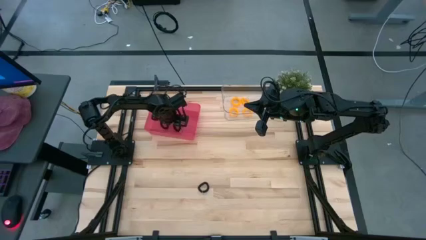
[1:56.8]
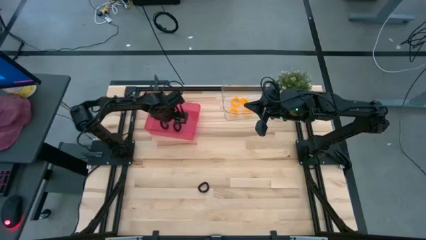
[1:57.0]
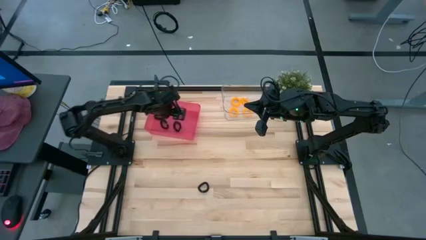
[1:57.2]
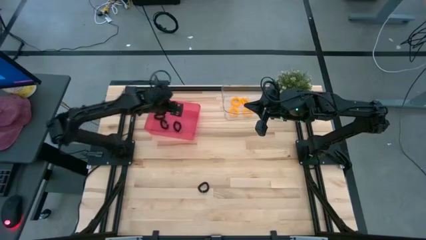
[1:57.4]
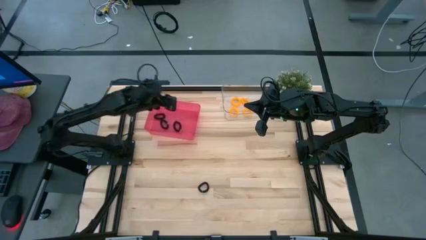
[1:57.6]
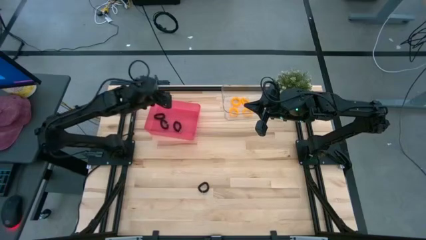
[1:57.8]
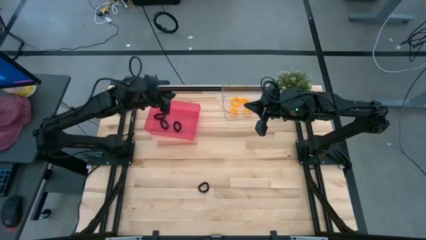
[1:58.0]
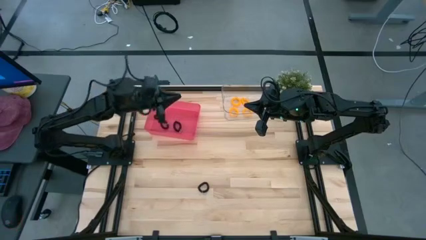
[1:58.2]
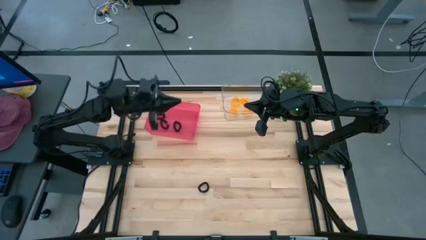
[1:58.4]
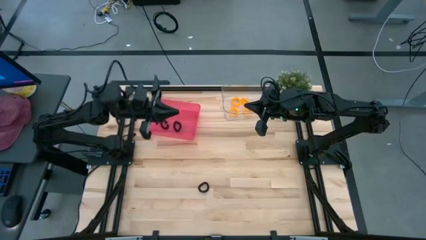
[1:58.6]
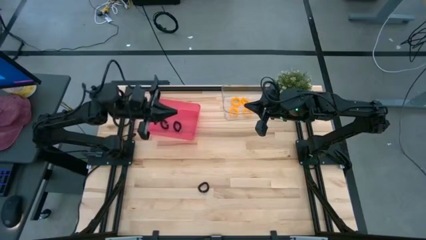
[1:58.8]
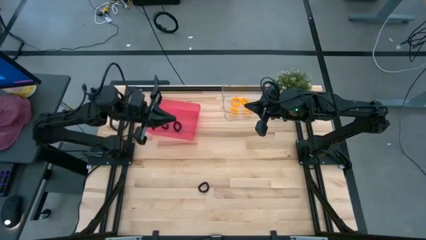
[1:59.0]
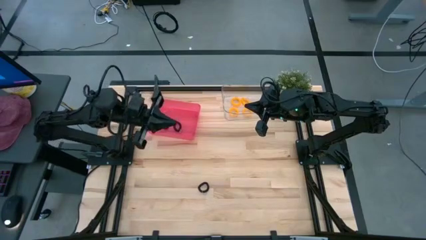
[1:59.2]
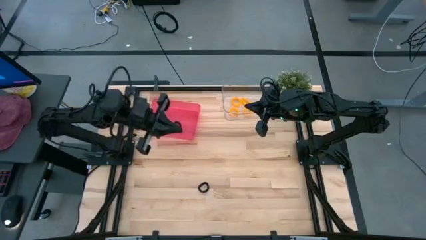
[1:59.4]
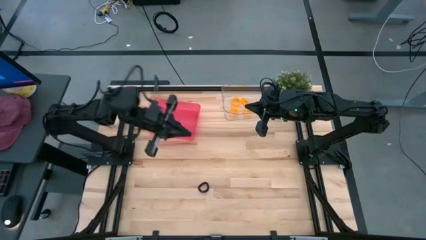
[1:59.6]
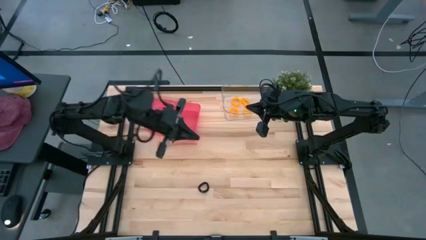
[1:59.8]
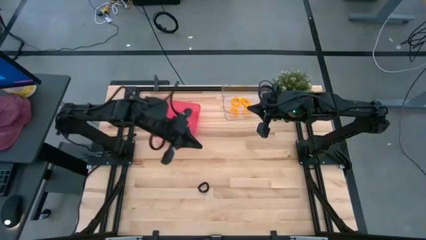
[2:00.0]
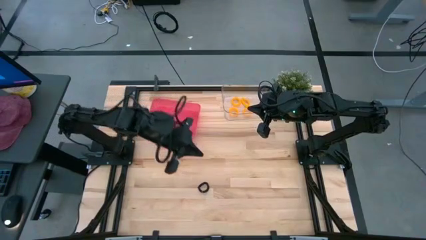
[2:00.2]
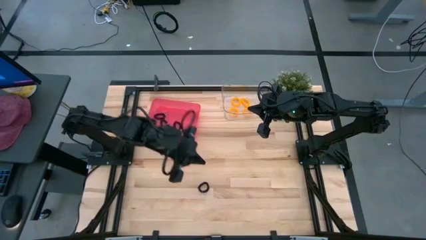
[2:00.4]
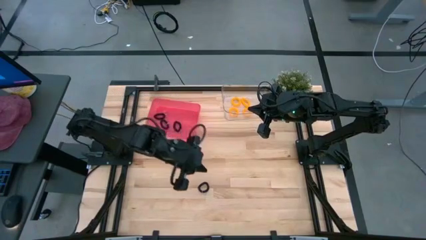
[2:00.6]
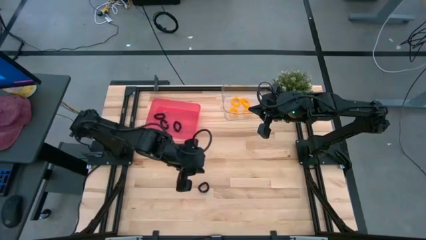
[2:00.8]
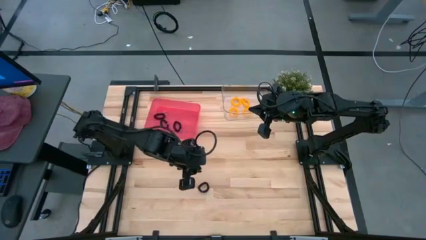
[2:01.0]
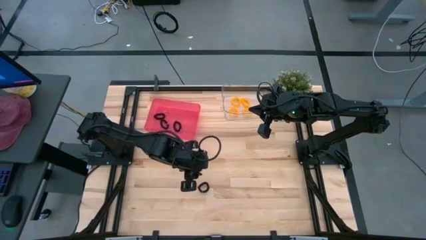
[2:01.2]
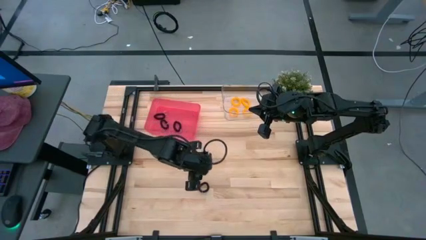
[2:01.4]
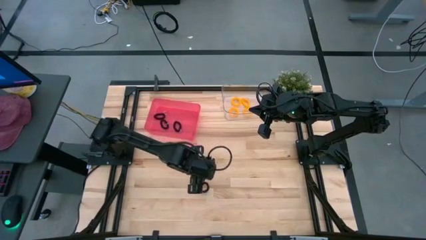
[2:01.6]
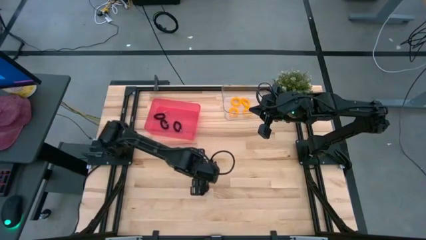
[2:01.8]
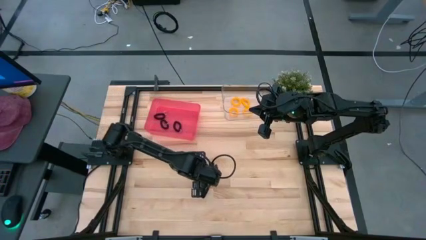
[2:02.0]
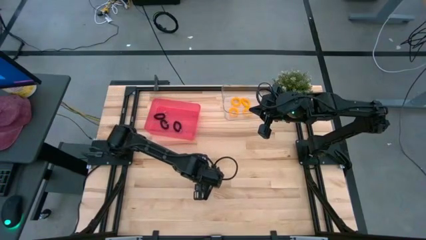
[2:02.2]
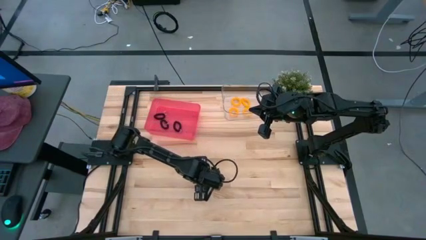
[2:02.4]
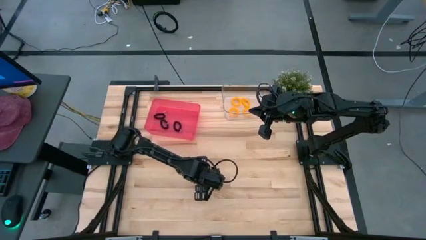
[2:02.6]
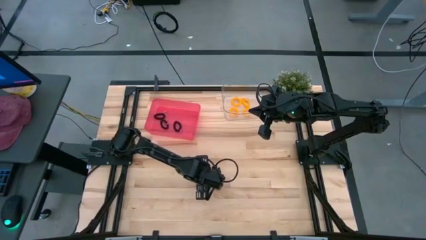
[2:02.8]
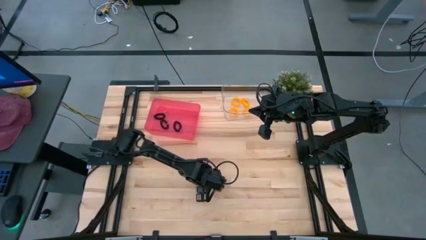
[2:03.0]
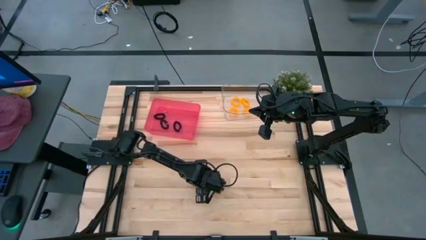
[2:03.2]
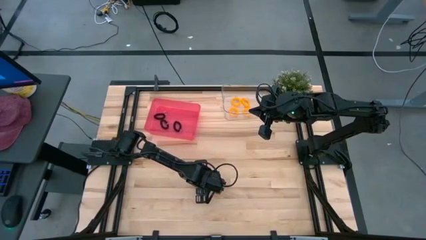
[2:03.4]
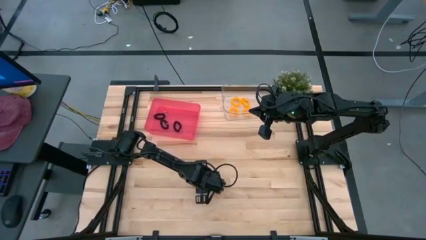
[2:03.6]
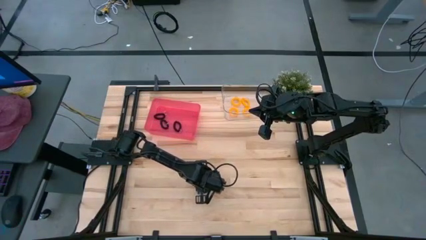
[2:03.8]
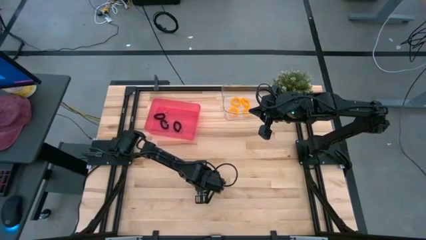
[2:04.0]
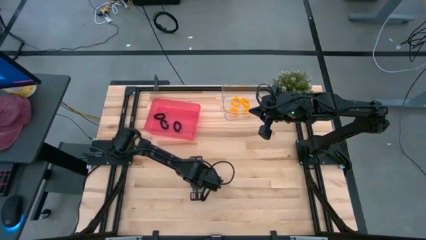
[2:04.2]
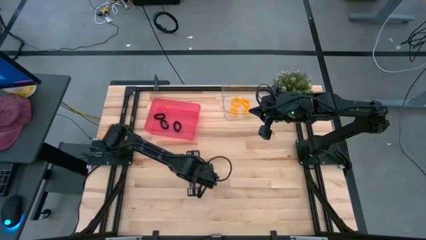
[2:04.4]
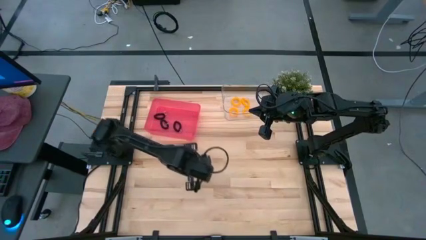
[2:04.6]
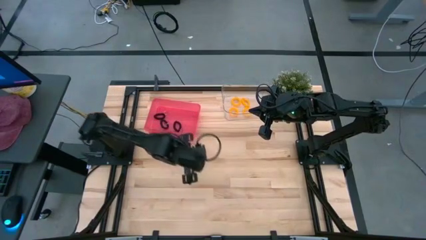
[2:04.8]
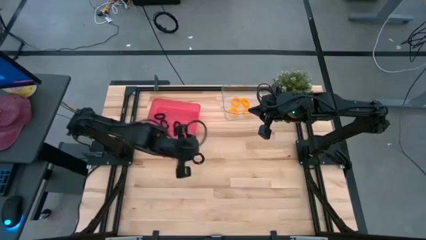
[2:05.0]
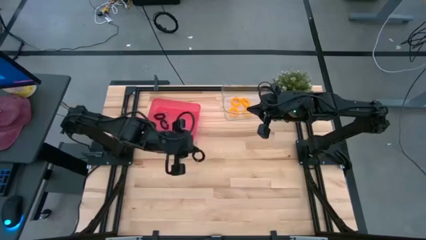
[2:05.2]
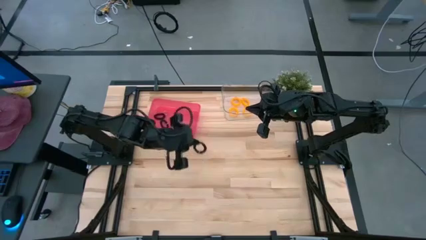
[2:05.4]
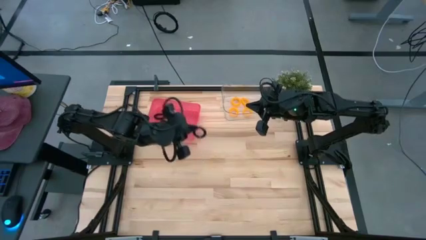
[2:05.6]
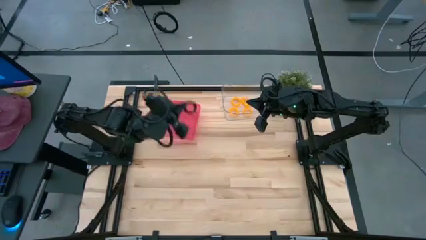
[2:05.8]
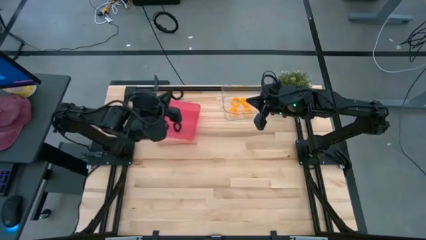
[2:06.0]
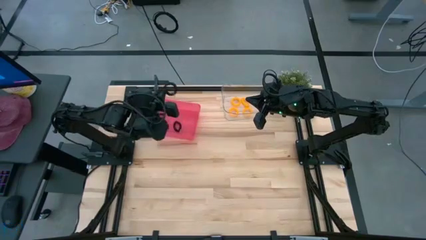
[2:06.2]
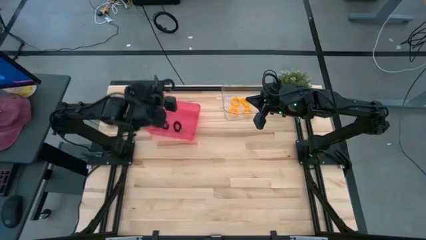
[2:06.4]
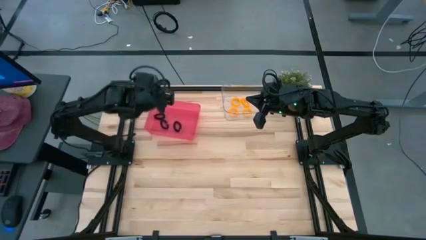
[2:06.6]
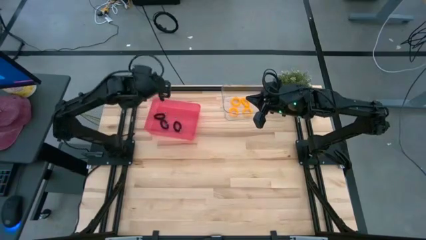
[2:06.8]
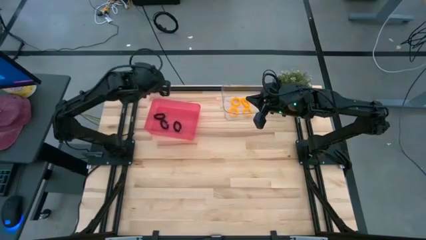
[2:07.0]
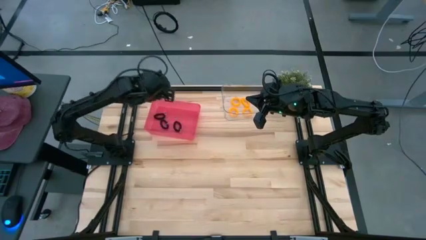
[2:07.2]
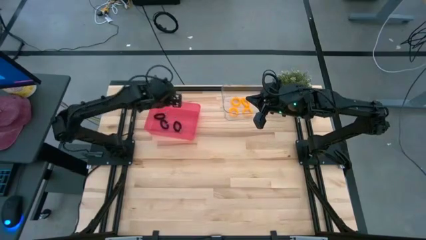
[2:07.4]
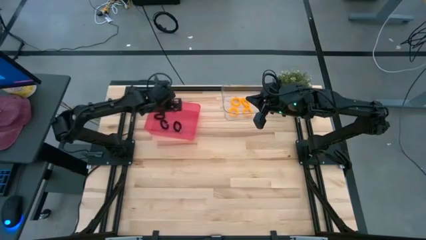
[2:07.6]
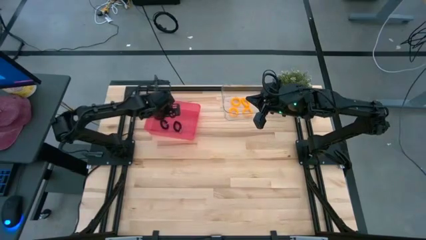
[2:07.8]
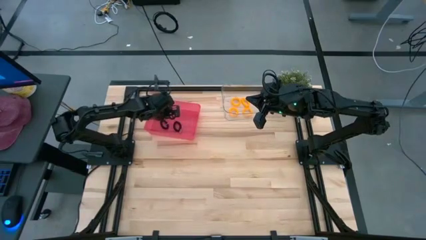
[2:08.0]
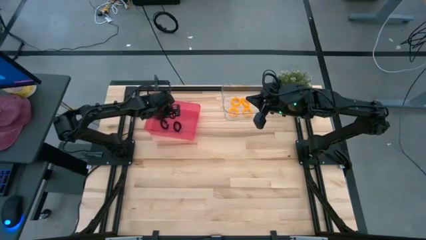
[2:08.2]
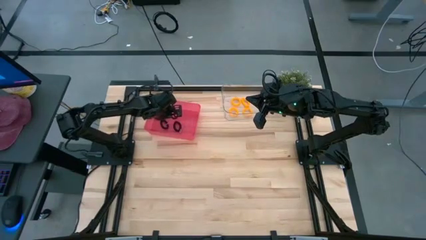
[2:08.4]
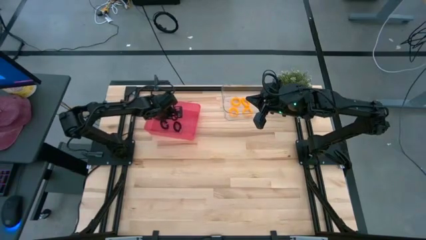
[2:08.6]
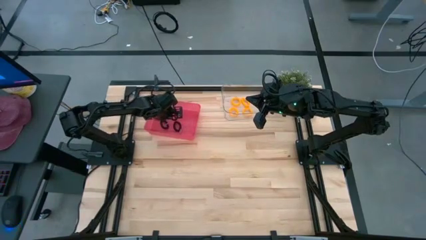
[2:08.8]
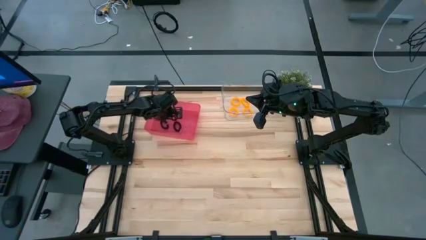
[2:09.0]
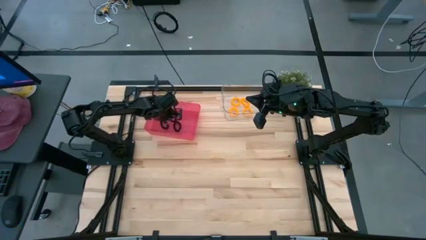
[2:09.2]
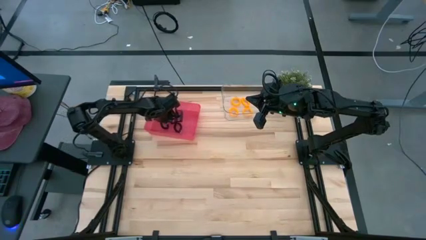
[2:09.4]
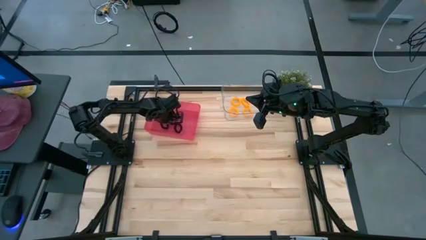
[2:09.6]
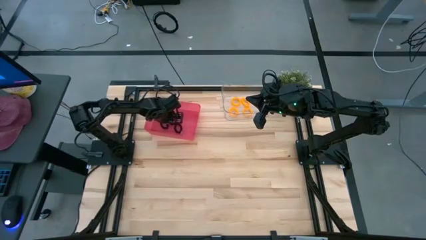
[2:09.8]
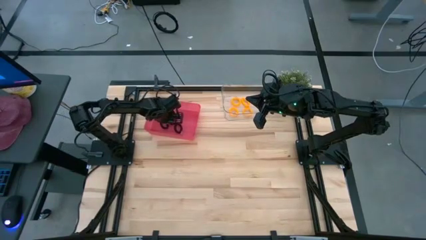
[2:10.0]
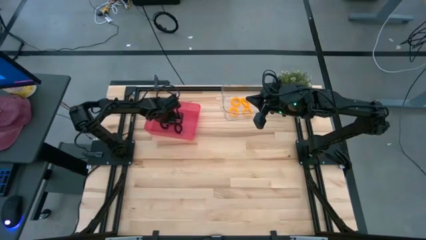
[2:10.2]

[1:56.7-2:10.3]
Task: Sort spring keychains
Put the black spring keychain into the pink bin
